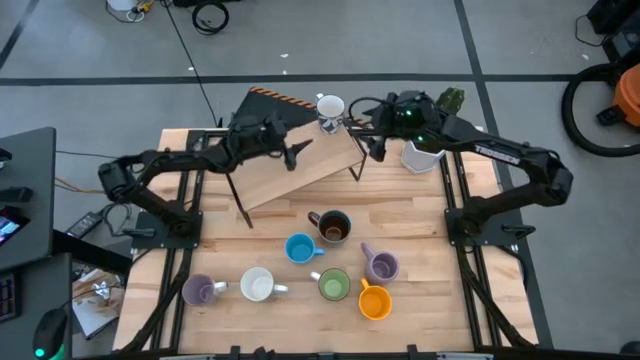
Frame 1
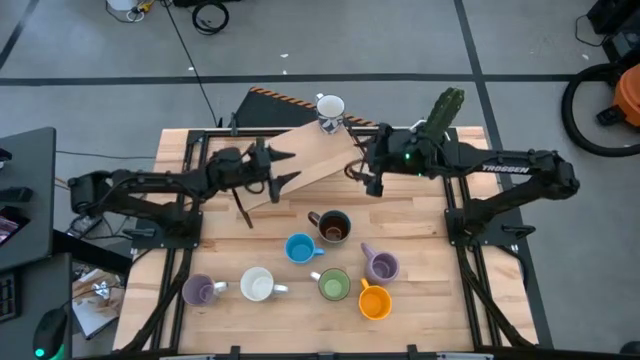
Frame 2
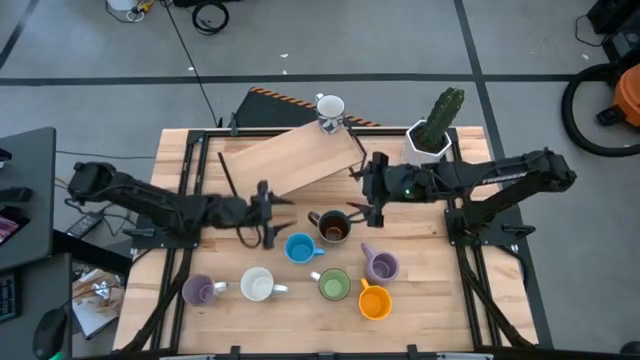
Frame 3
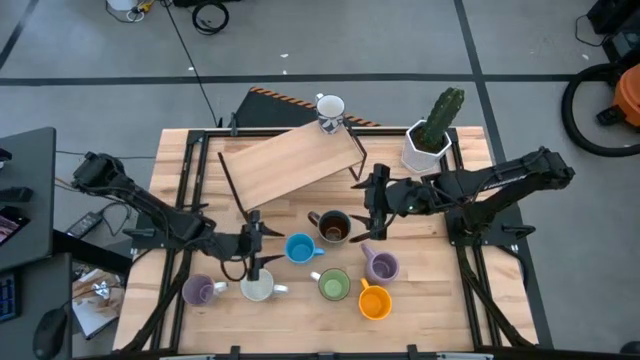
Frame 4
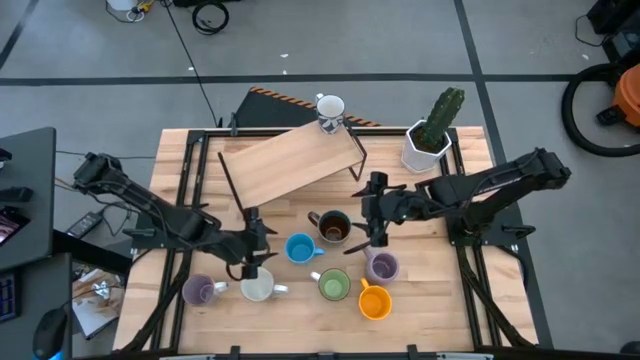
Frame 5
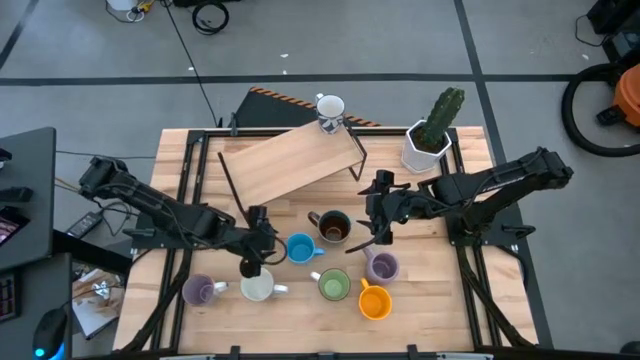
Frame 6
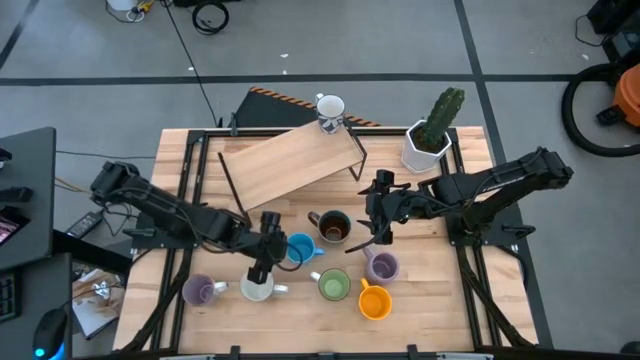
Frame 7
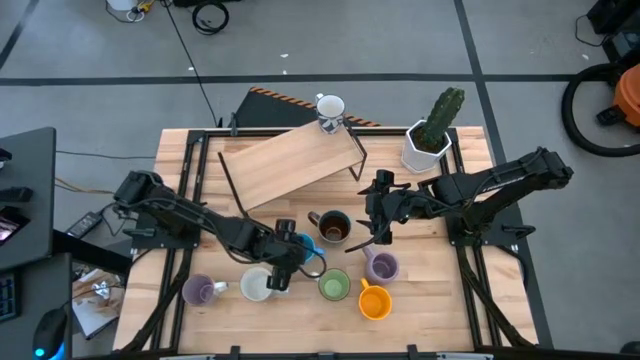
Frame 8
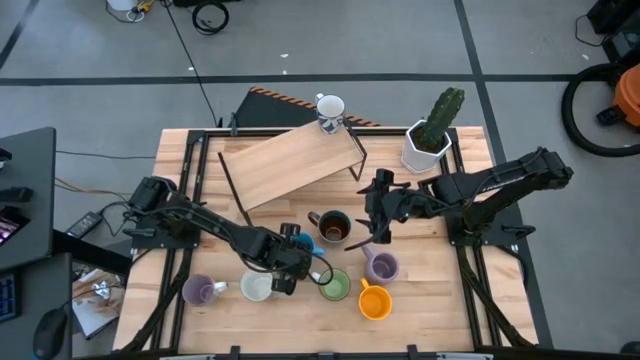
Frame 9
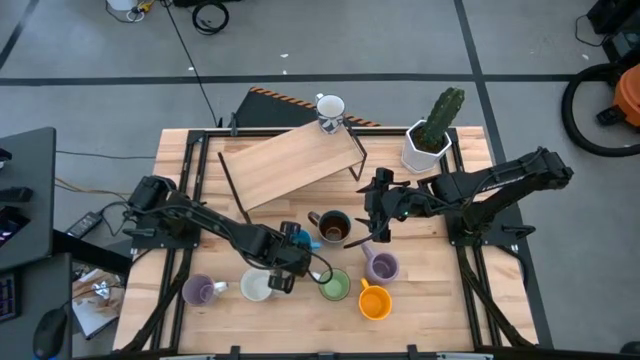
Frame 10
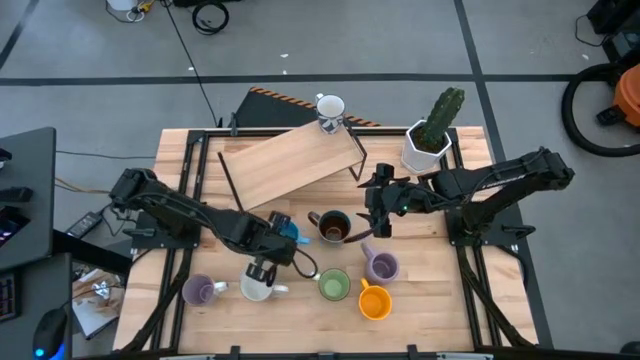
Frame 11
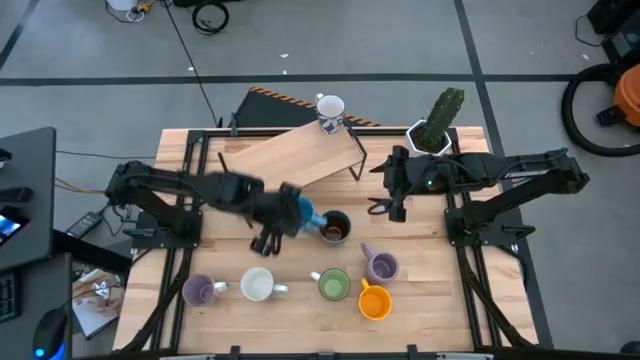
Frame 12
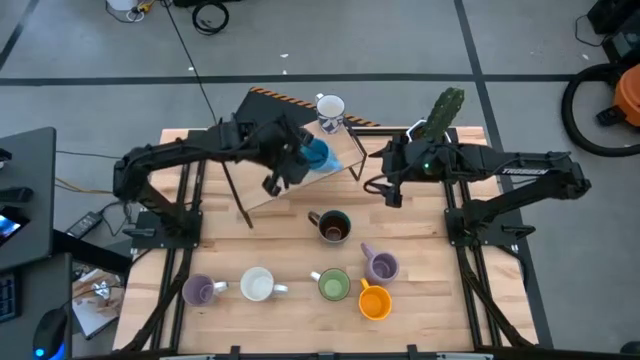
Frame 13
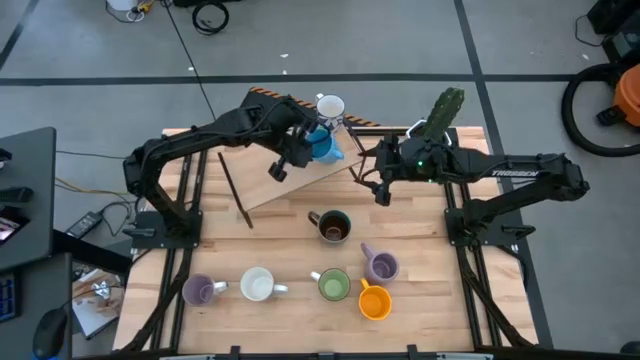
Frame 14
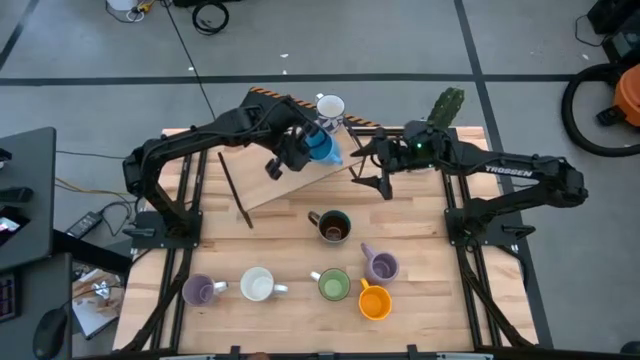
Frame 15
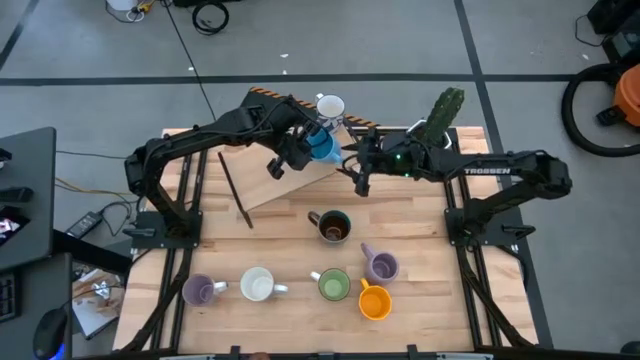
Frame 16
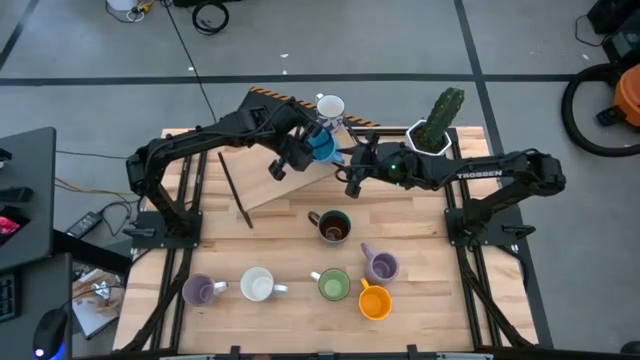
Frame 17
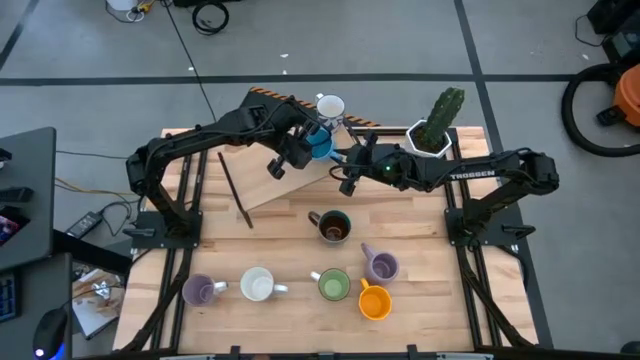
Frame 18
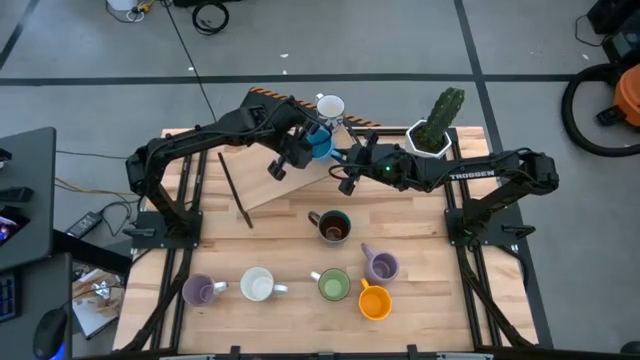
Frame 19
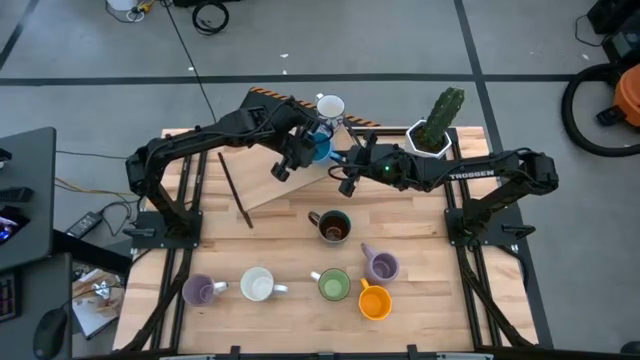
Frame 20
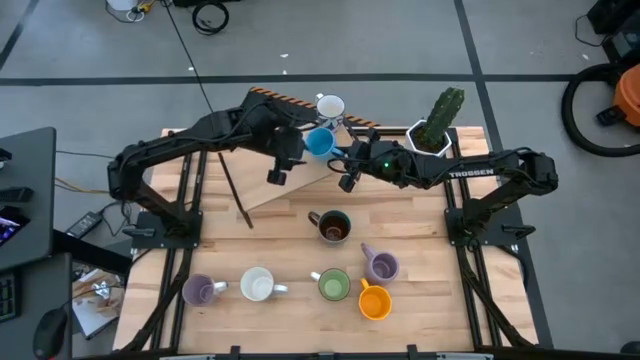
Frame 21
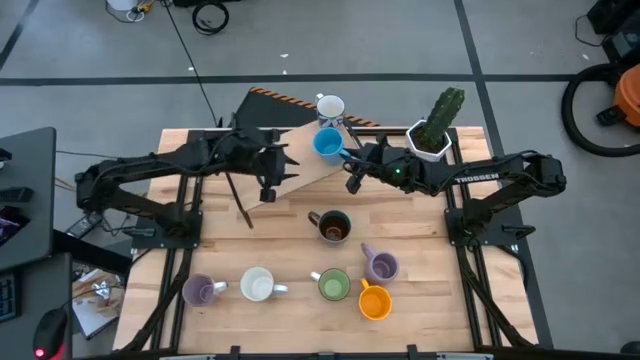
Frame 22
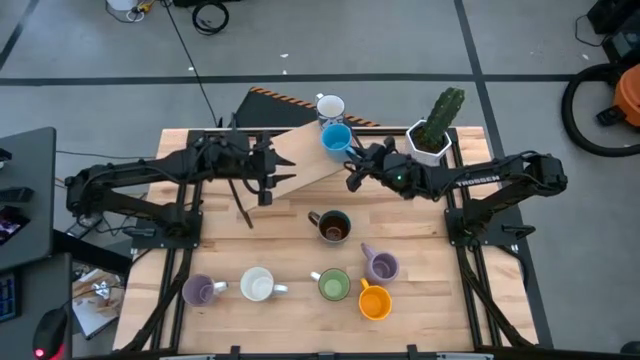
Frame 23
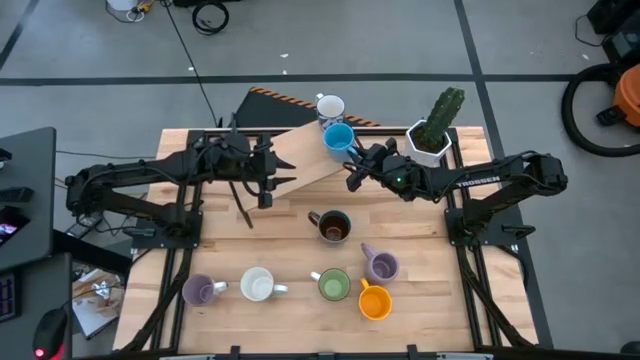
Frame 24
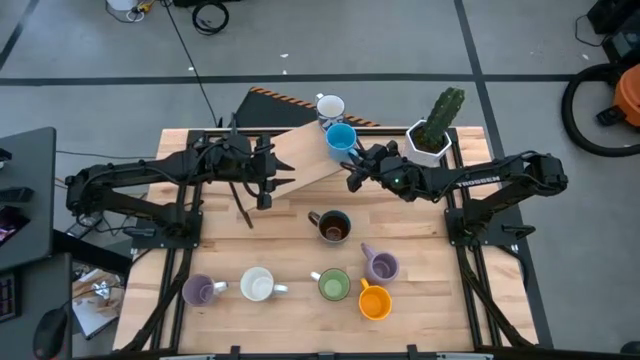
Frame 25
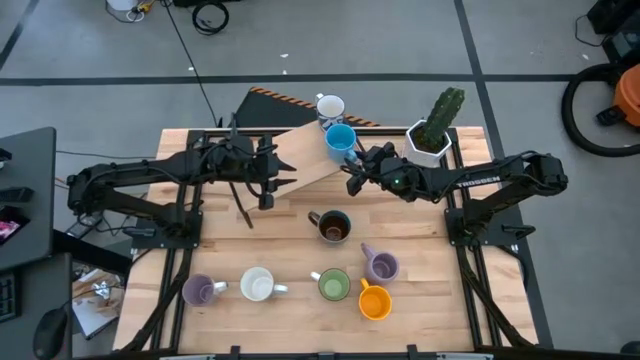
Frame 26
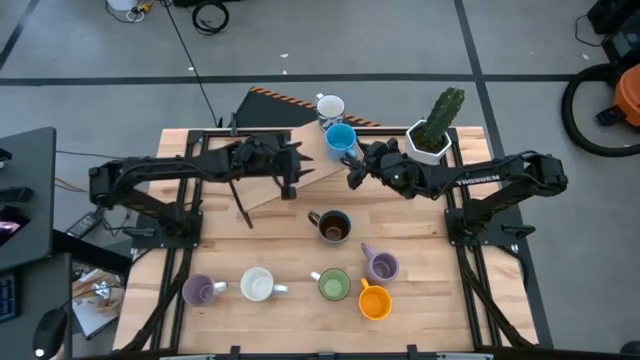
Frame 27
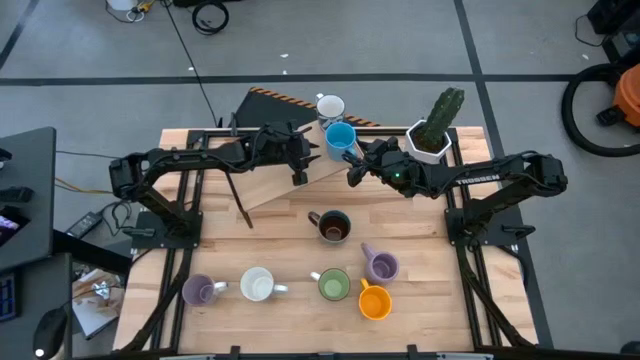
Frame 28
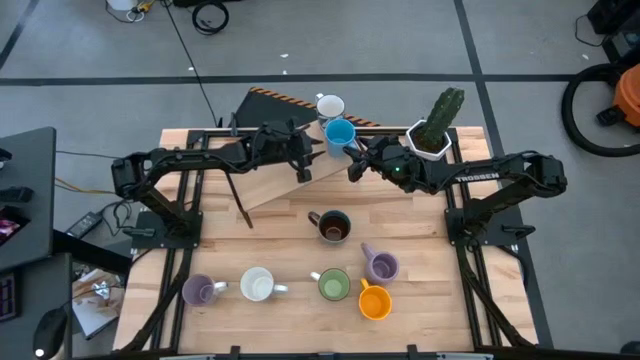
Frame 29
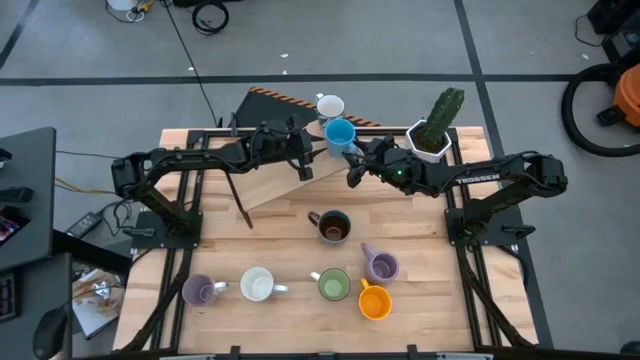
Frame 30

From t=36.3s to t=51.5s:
Task: Place coffee mugs
Put the light blue mug on the shelf

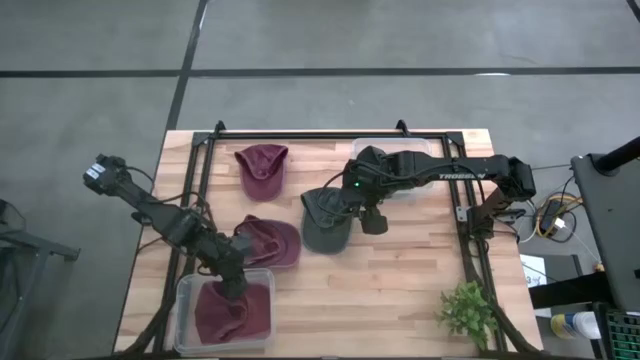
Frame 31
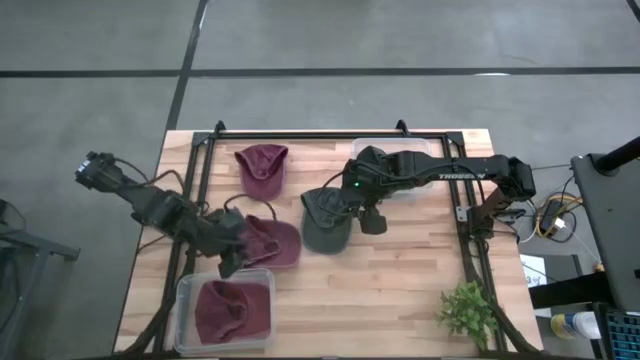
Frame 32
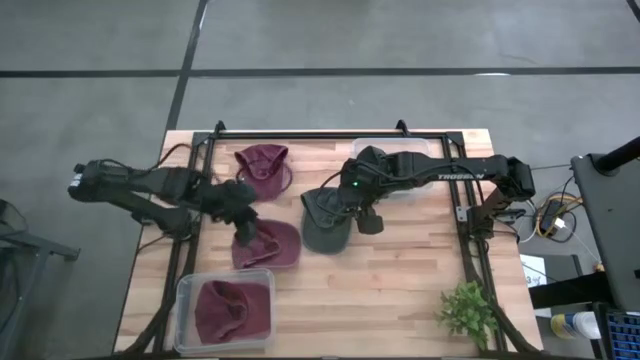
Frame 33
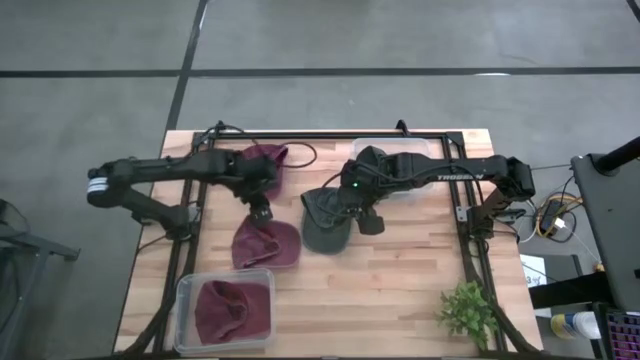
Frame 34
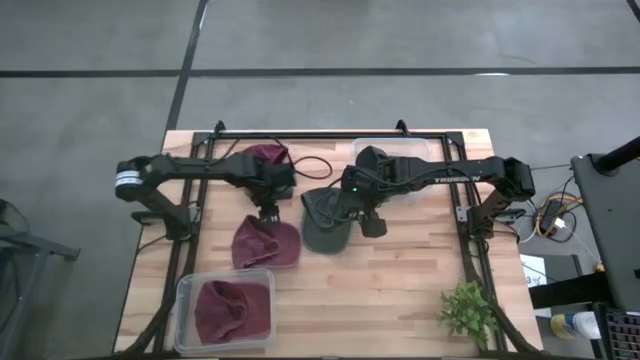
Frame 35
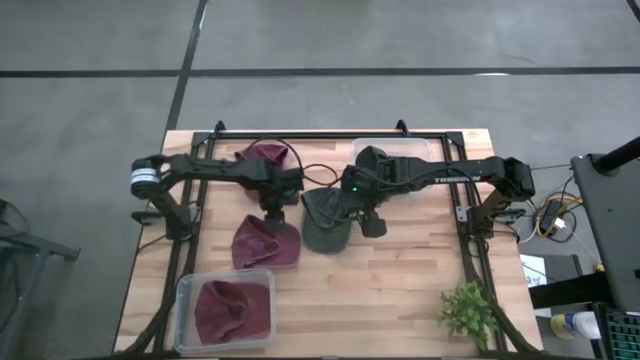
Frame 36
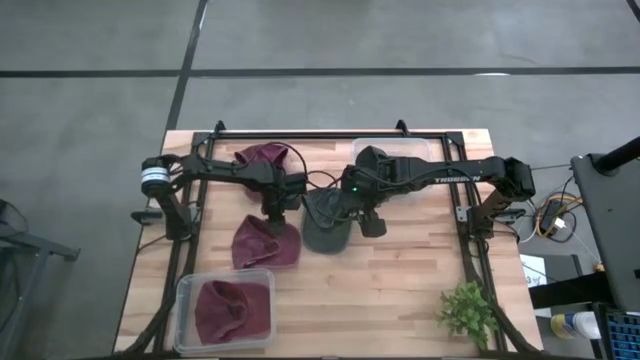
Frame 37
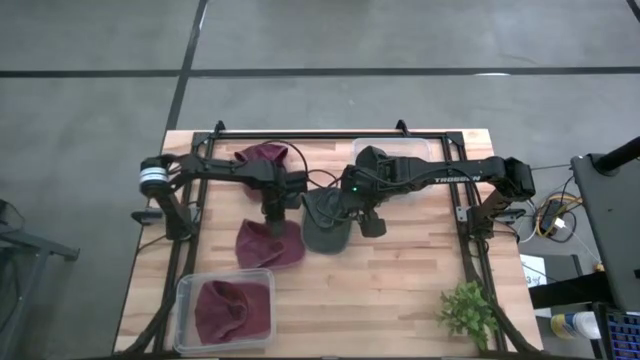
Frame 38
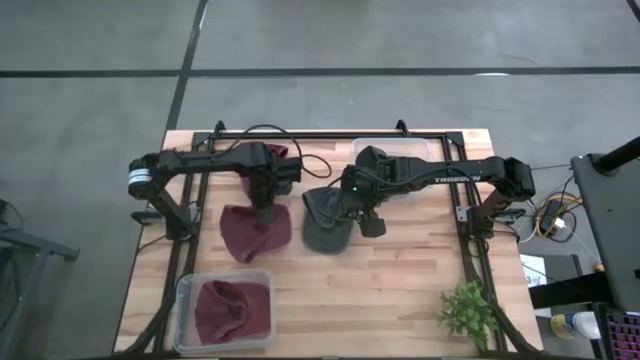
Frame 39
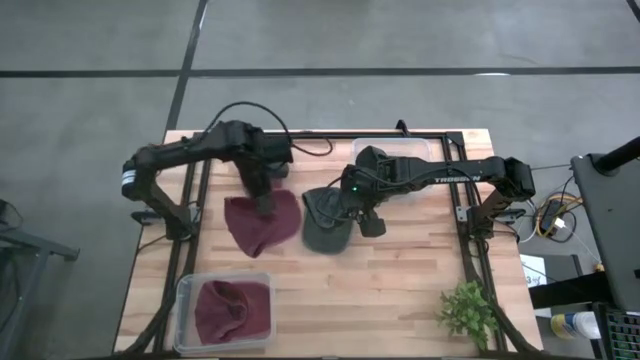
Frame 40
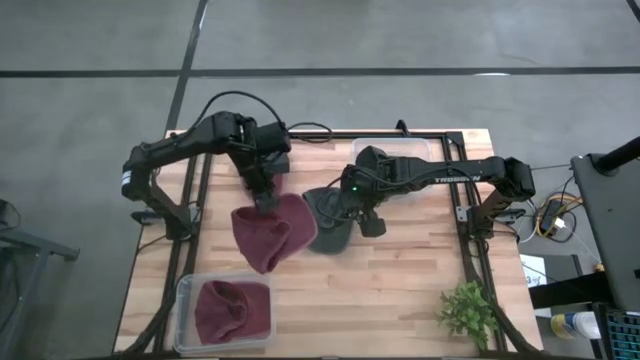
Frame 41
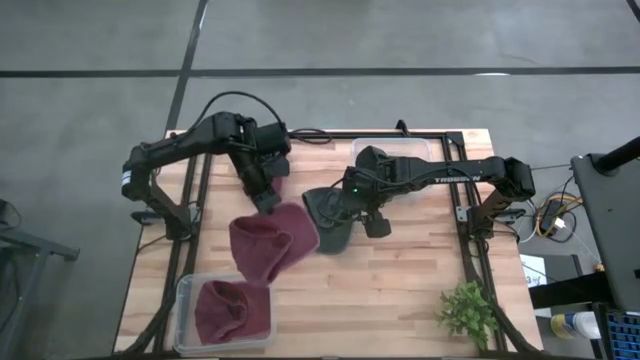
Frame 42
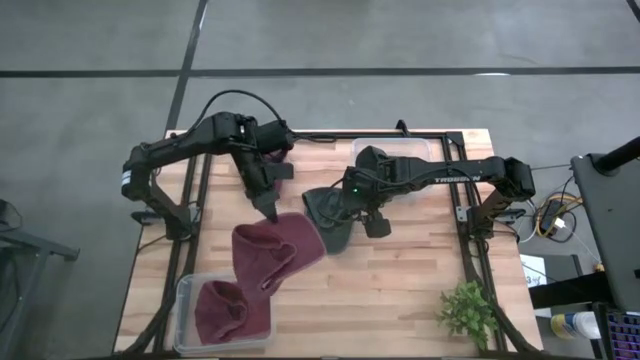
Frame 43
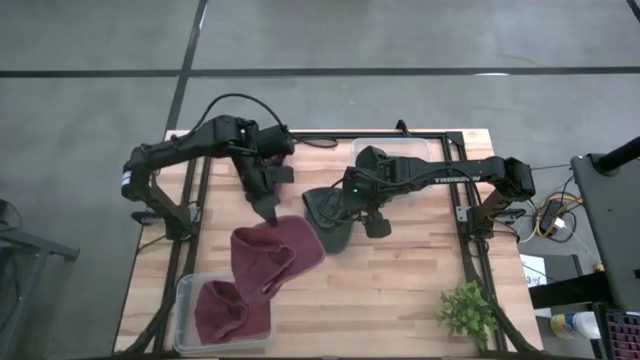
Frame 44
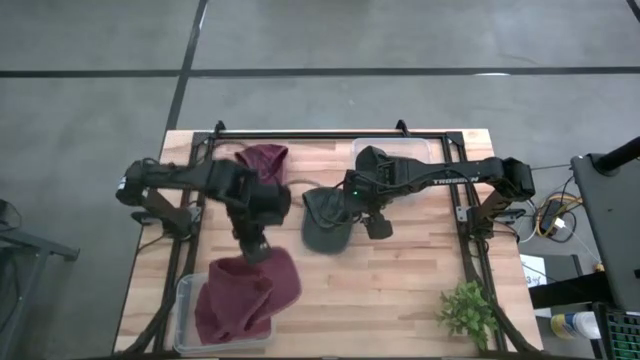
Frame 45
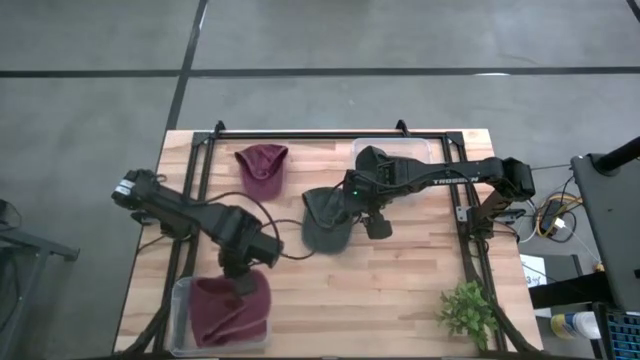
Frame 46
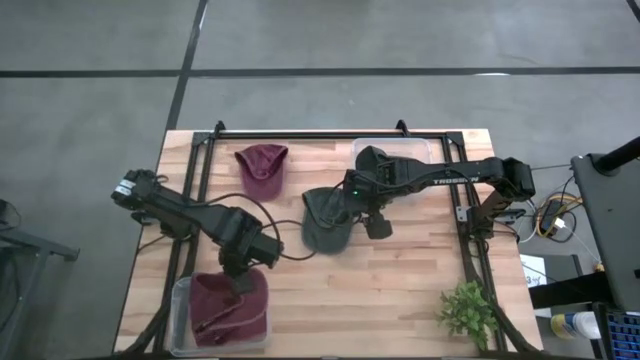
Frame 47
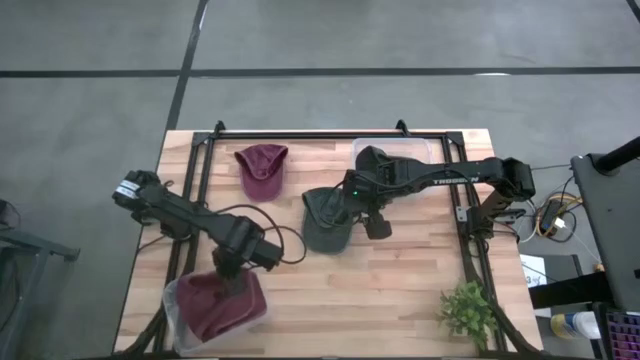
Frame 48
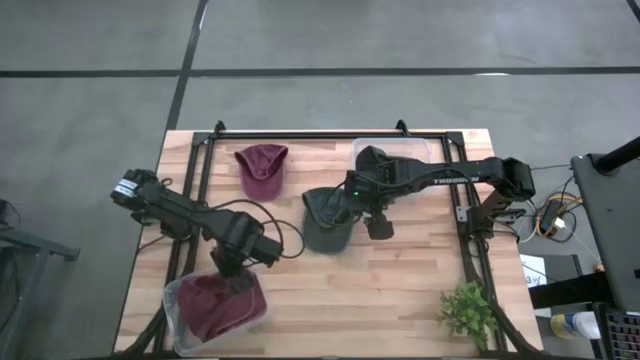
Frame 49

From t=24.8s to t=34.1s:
Task: Pick & Place hat
Put the bottom dark red cap into the bottom transparent bin
